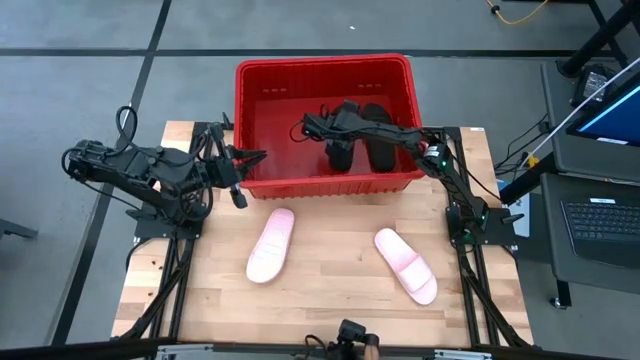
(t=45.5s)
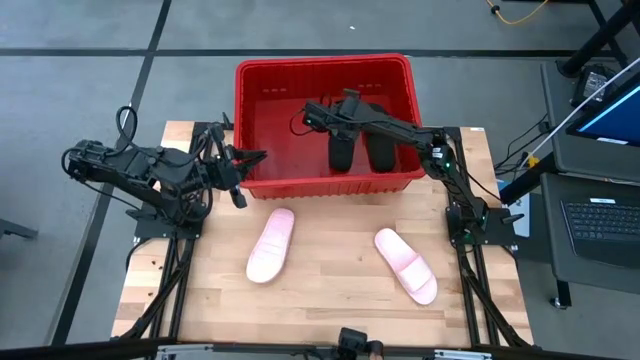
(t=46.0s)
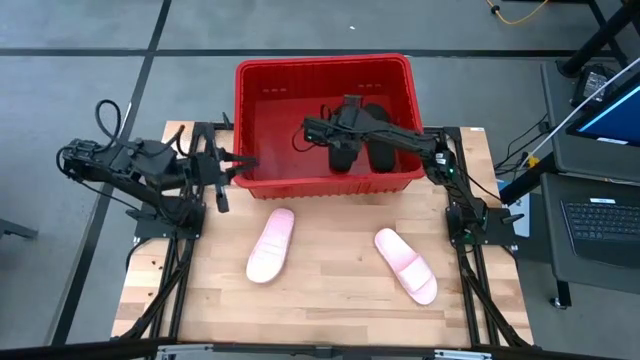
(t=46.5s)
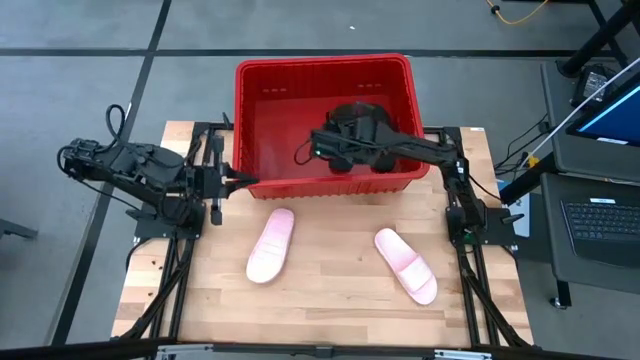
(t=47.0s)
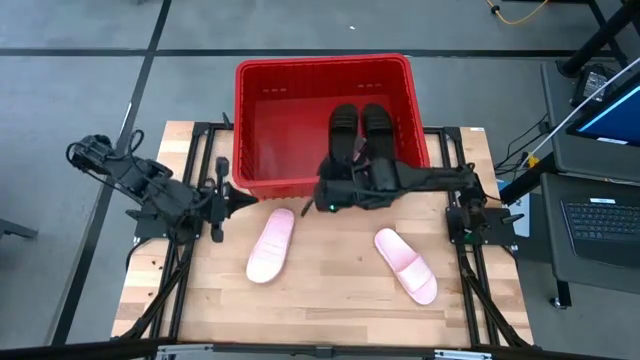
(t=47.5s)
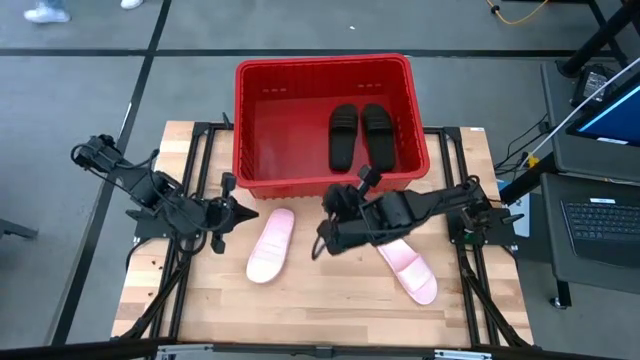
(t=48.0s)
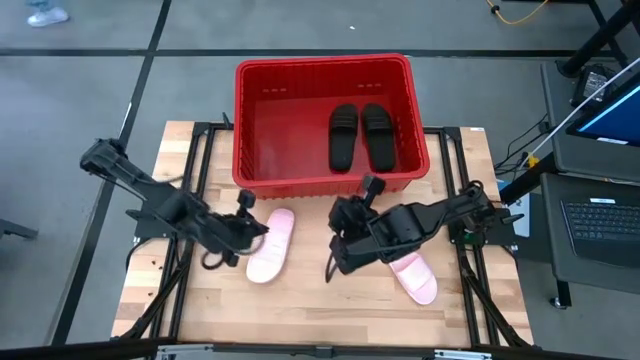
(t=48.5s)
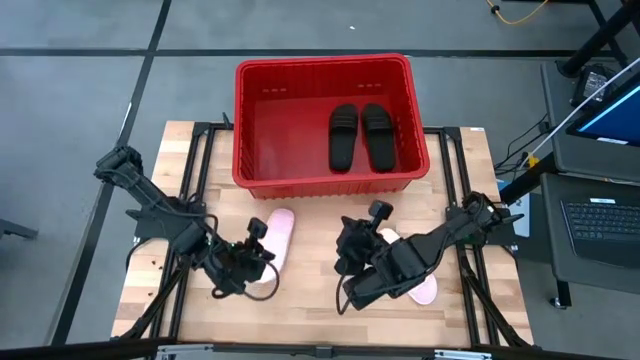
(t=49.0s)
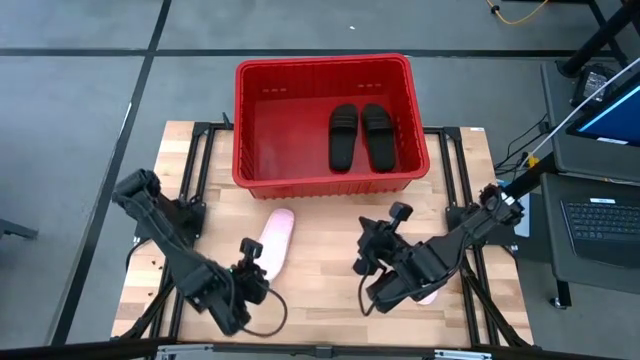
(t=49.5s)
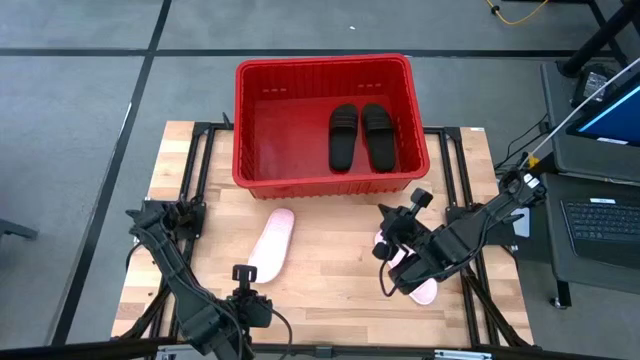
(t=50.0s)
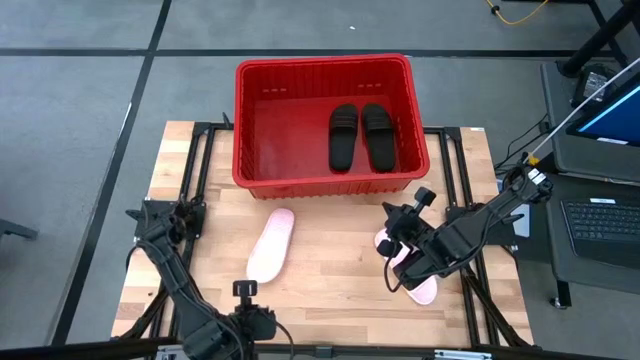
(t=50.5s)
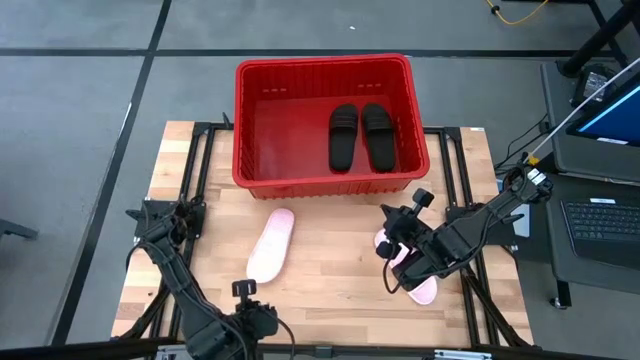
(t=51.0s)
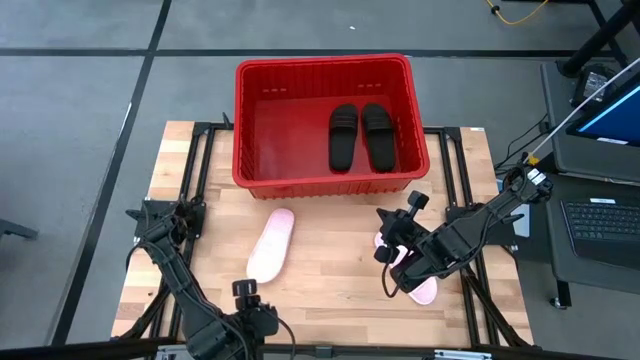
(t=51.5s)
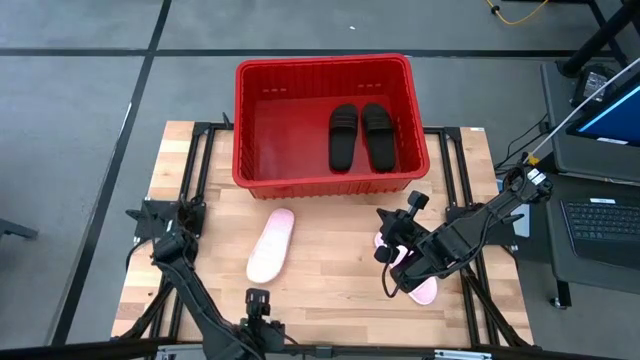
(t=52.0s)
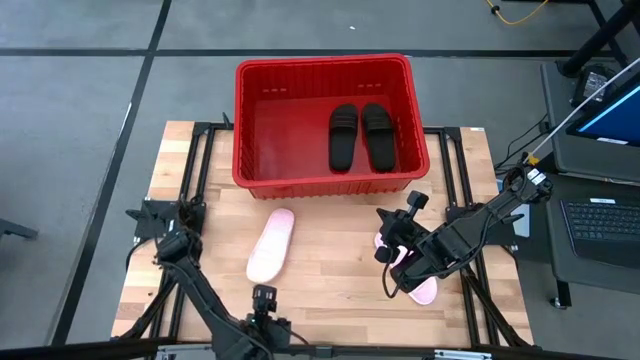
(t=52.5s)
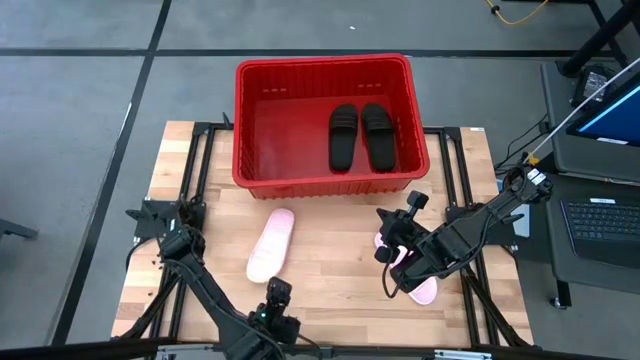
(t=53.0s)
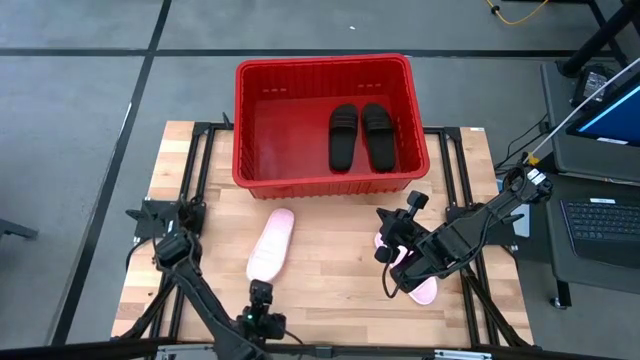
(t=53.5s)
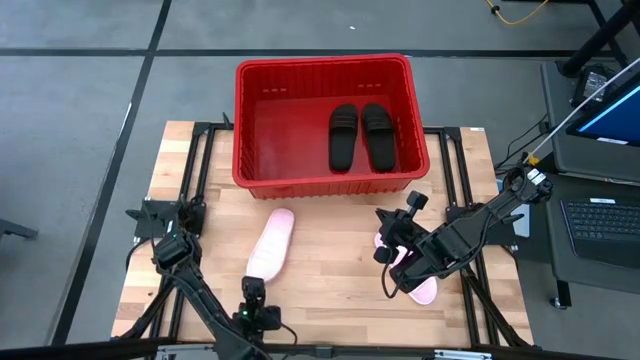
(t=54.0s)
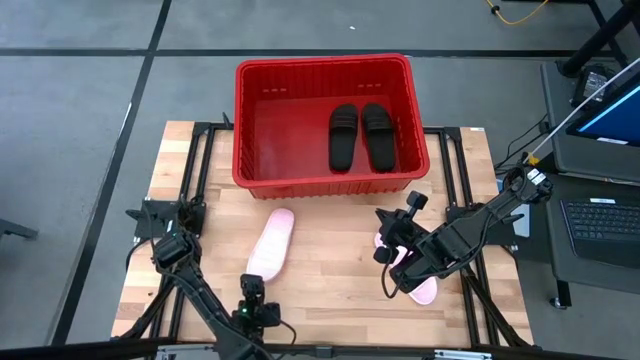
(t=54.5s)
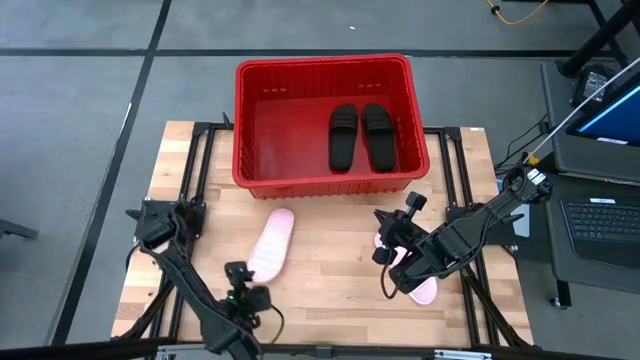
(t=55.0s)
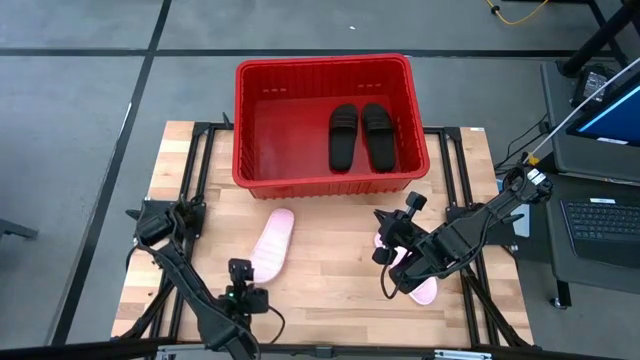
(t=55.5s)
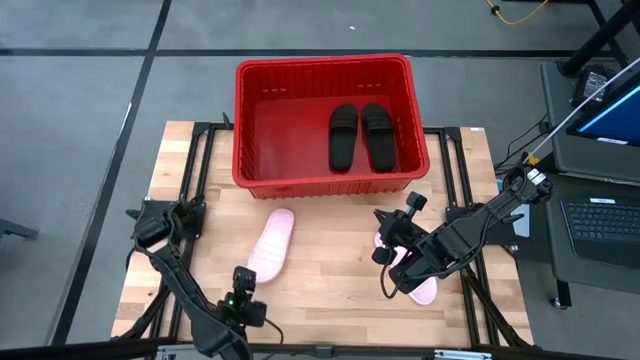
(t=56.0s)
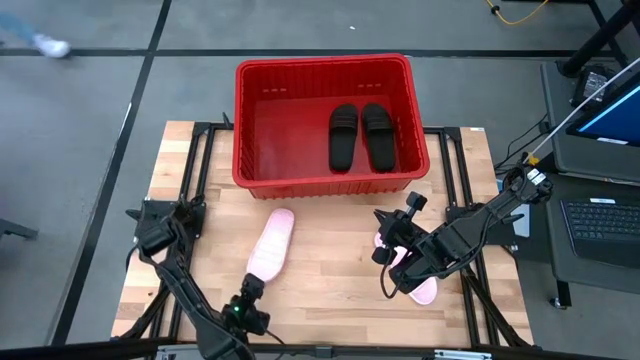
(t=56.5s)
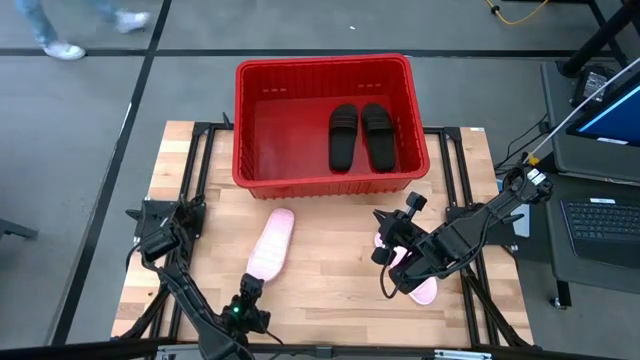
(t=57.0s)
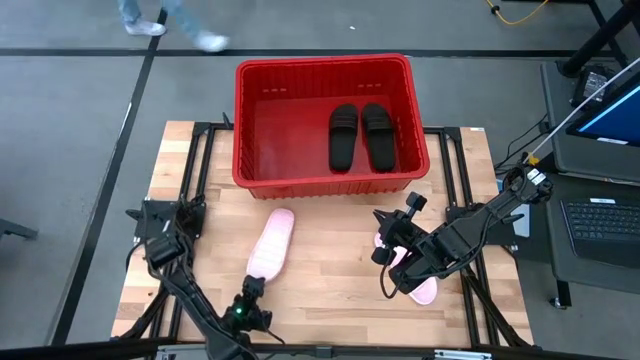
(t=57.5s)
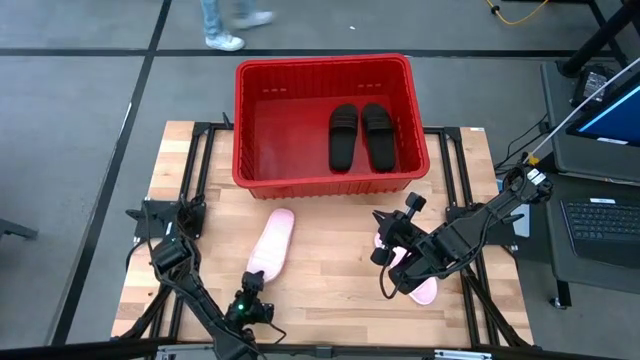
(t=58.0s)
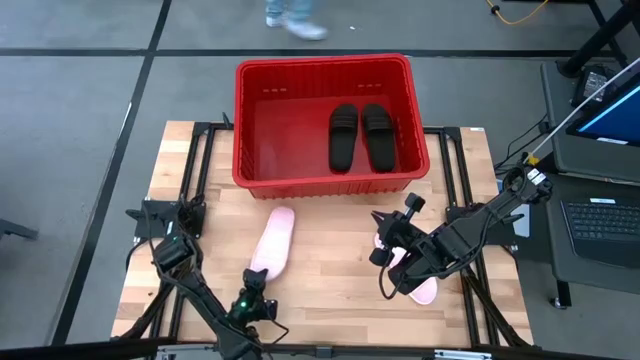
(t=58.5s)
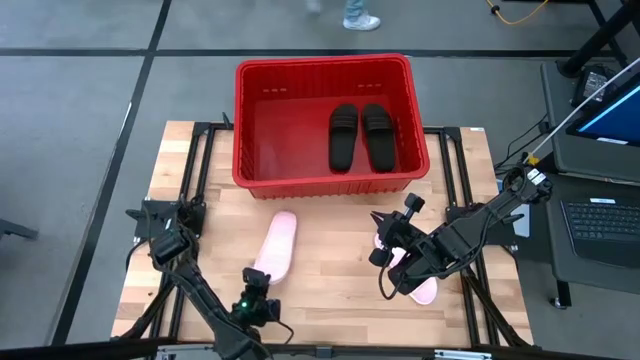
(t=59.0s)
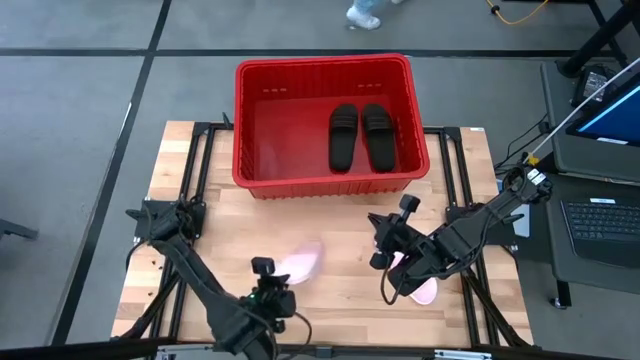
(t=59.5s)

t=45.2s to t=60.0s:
Task: Pick and place slides into bin
Put the left pink slide into the bin

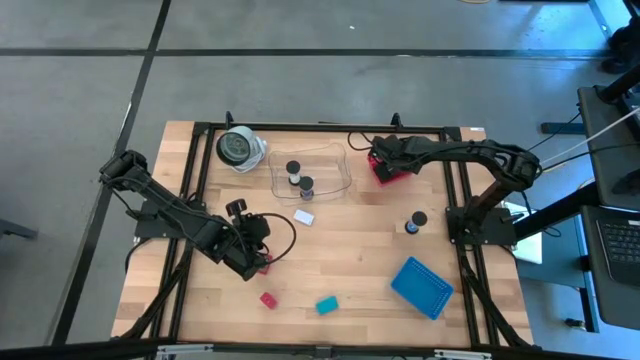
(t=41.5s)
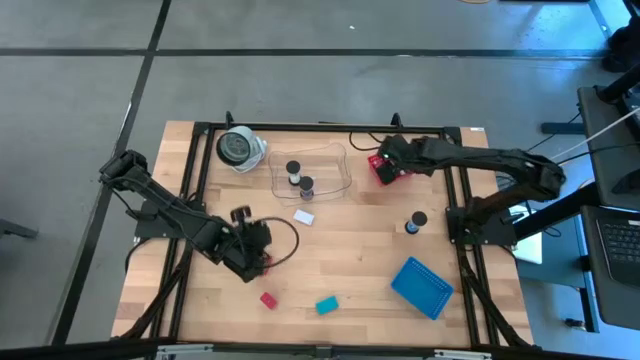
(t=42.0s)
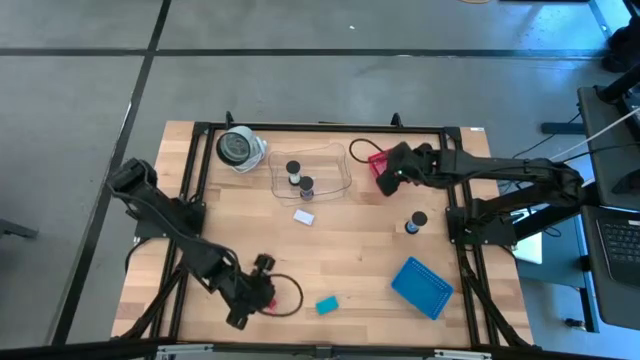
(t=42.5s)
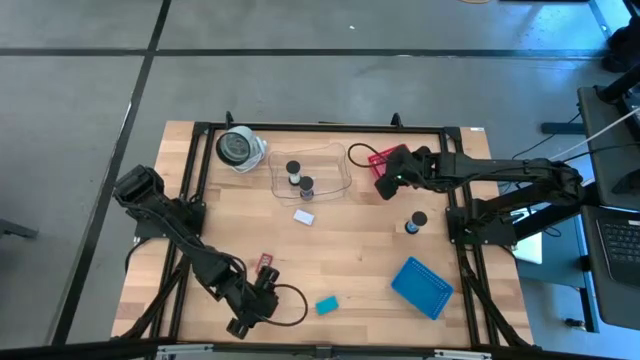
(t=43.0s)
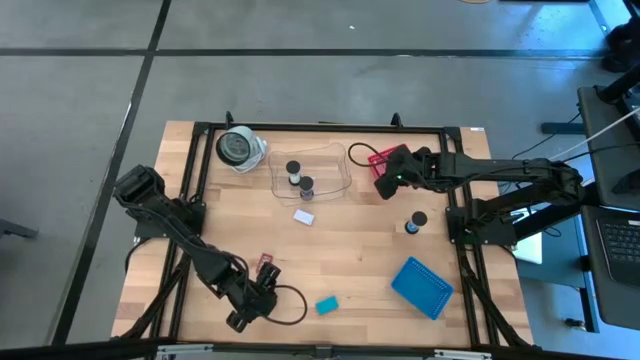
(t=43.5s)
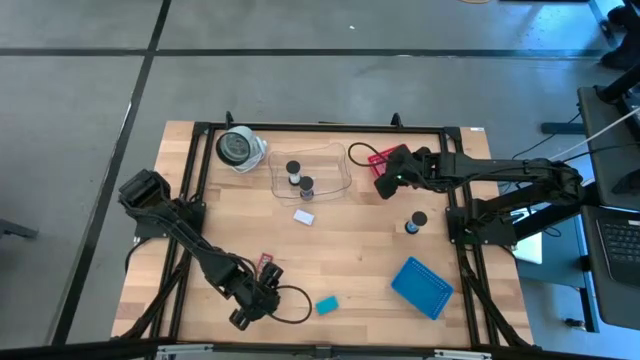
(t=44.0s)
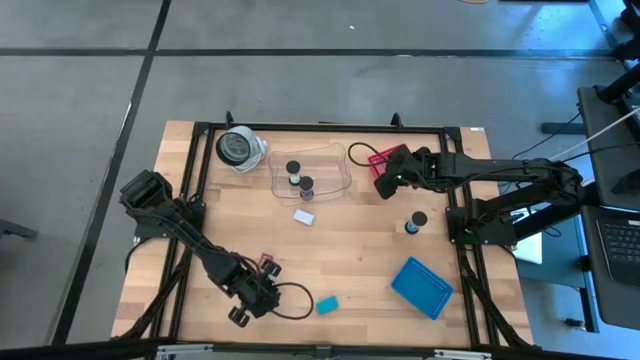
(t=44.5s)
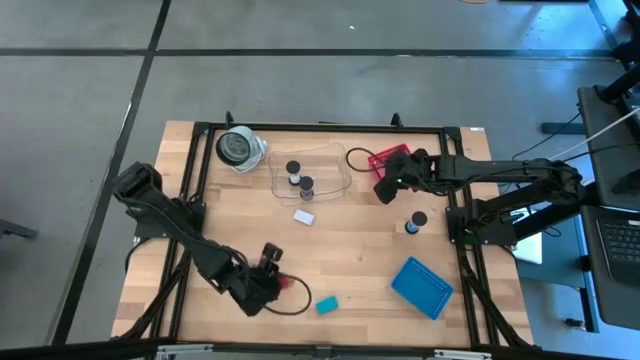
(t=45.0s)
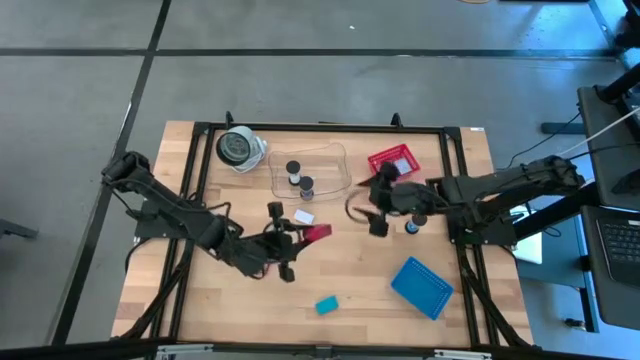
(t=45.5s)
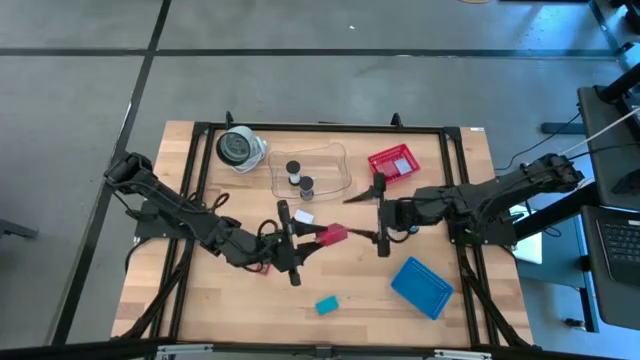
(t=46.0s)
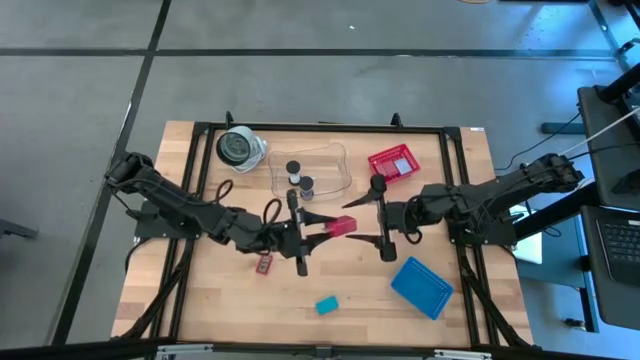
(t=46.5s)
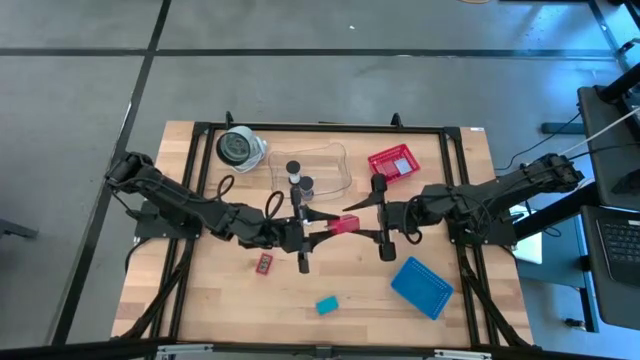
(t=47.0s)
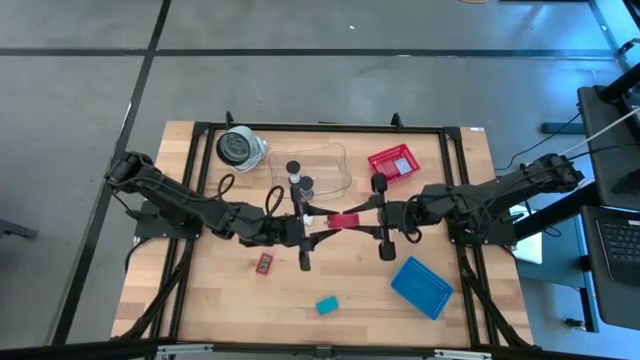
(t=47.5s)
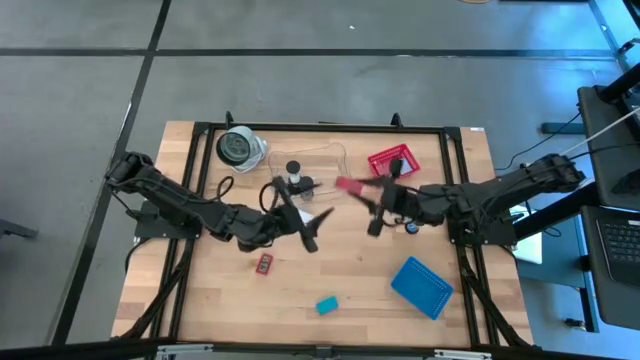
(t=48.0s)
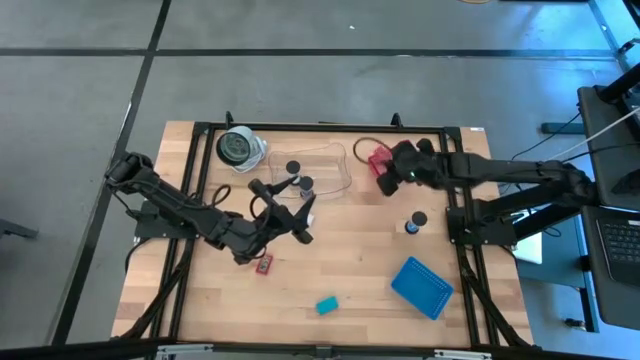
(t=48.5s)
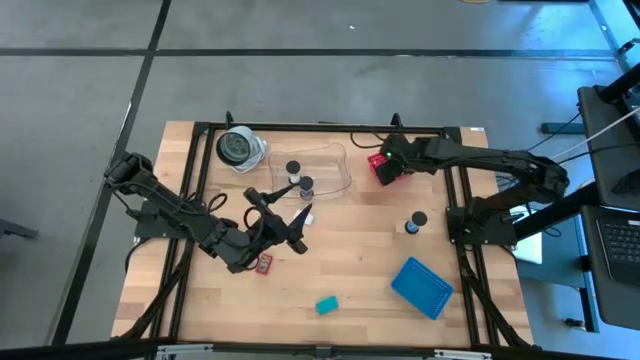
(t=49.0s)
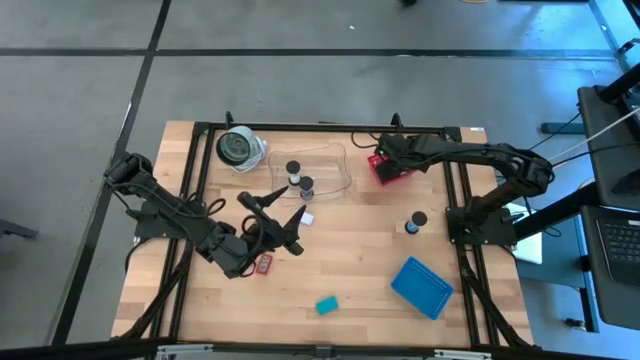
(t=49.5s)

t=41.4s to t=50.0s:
Task: Pick & Place Office items
Put the red charger adapter into the red bin
